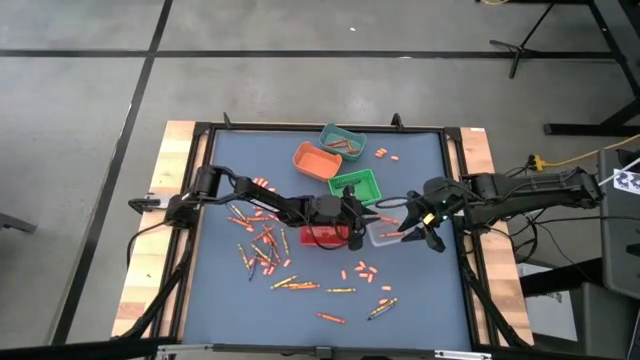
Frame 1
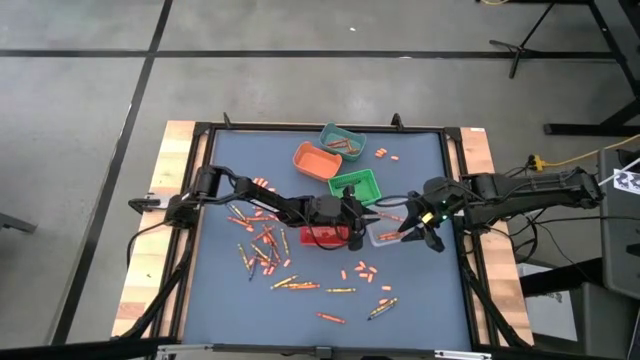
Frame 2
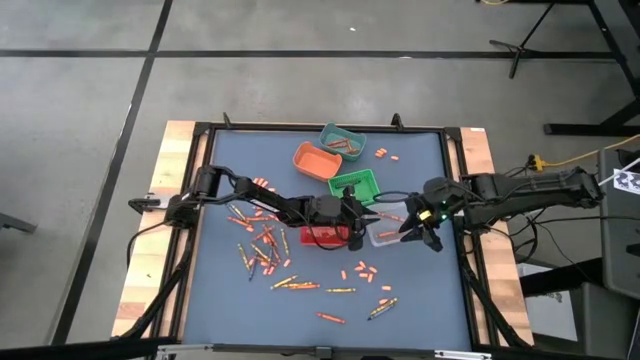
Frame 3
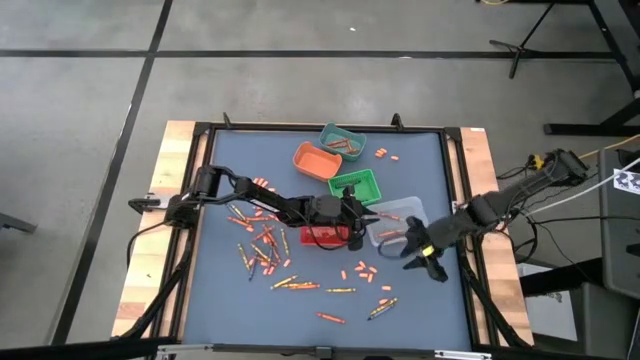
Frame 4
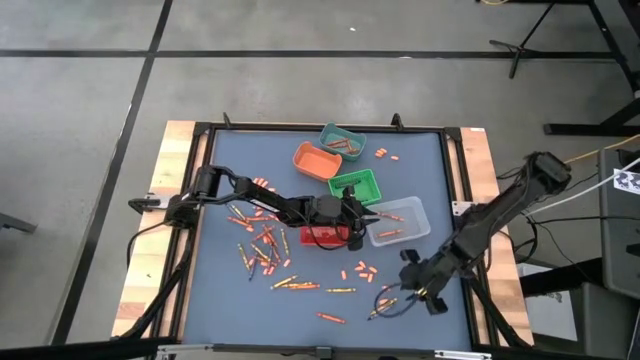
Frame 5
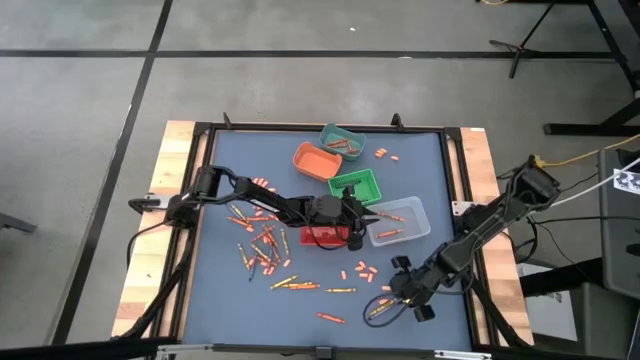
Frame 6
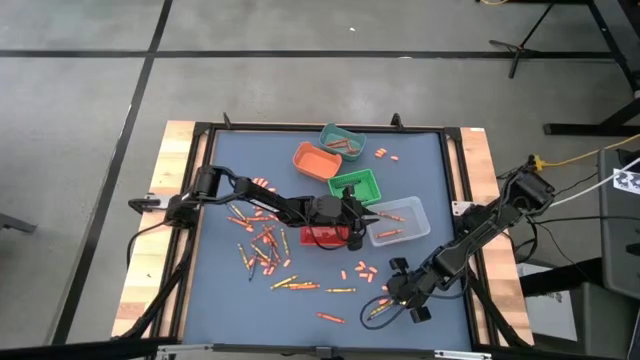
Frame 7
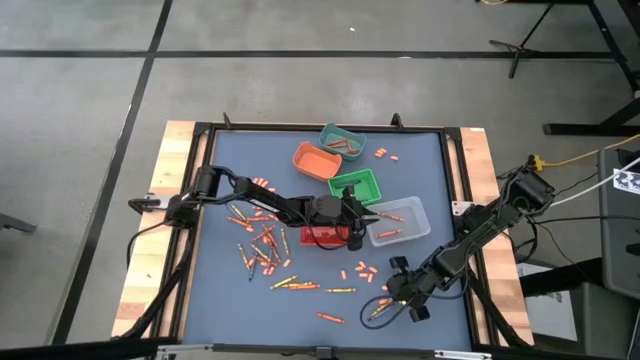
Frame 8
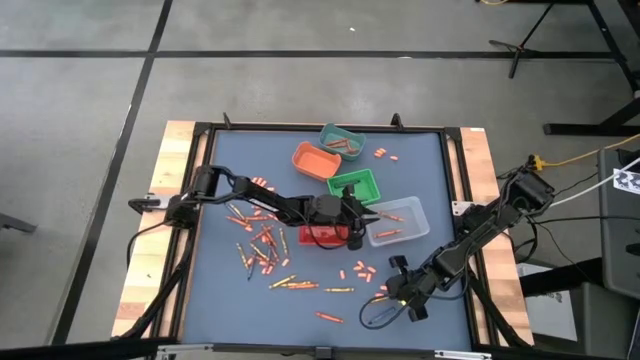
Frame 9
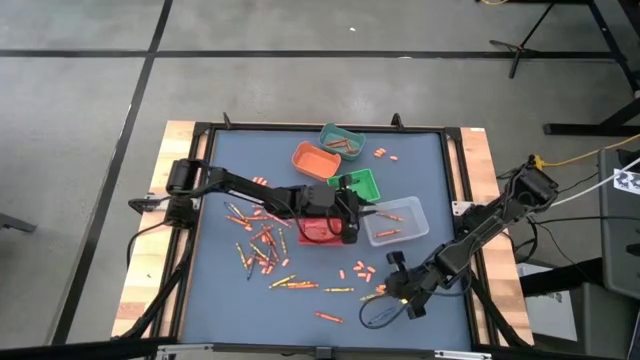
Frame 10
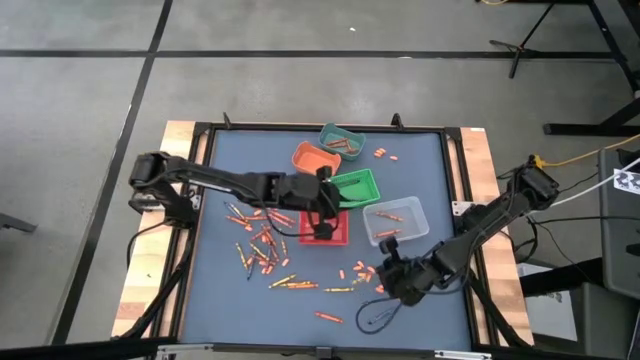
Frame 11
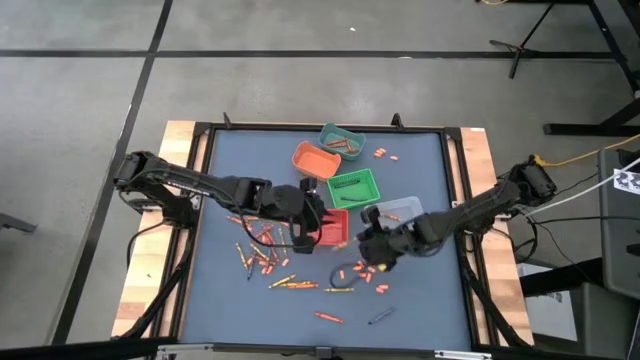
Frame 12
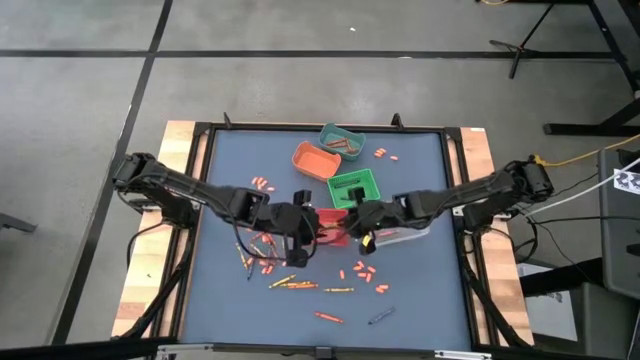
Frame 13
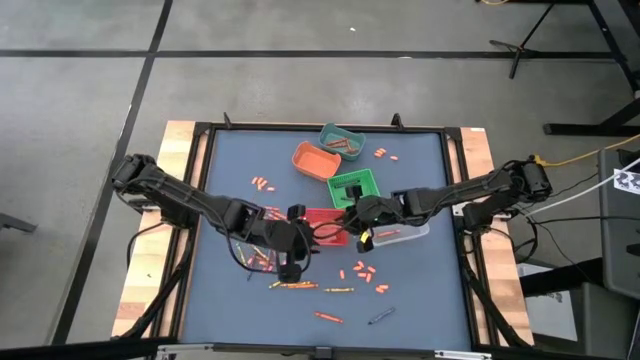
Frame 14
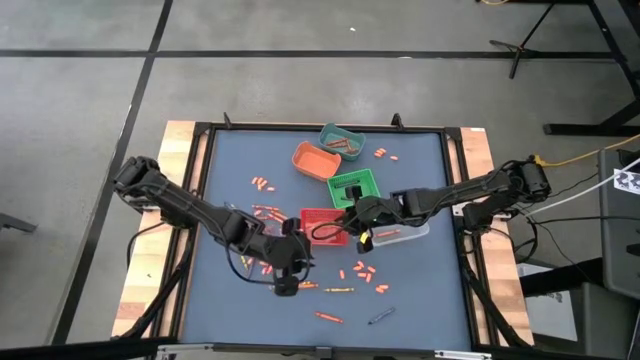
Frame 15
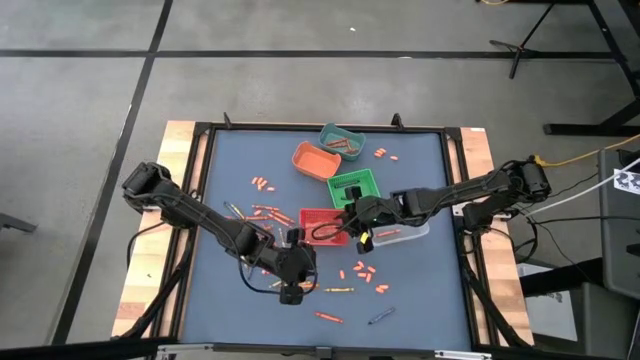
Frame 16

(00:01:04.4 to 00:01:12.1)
Task: Sort crayons
Put the yellow crayon into the red bin

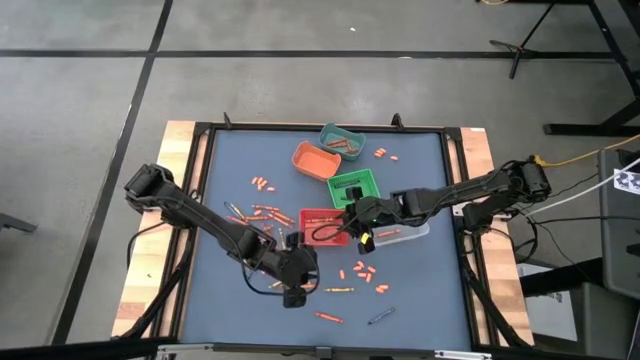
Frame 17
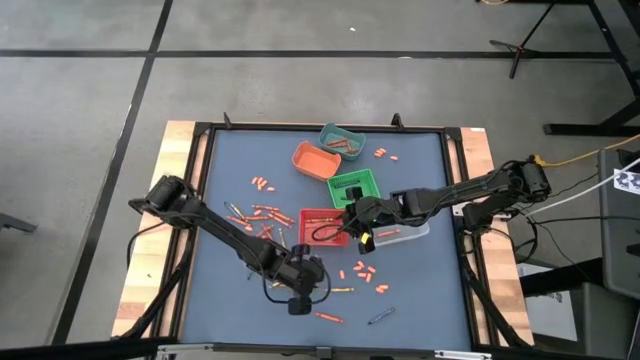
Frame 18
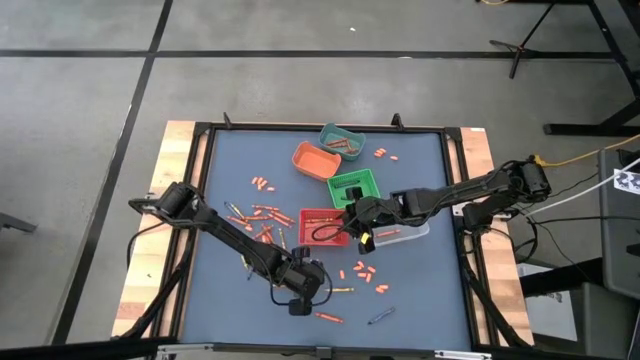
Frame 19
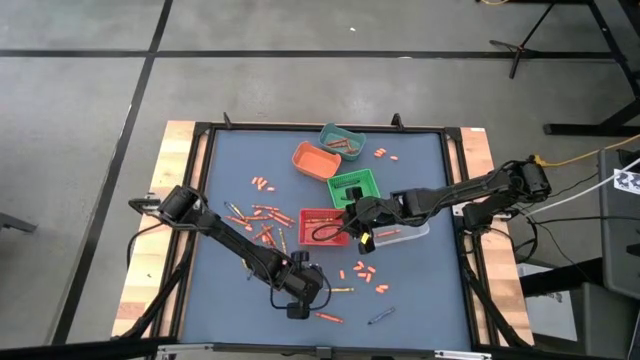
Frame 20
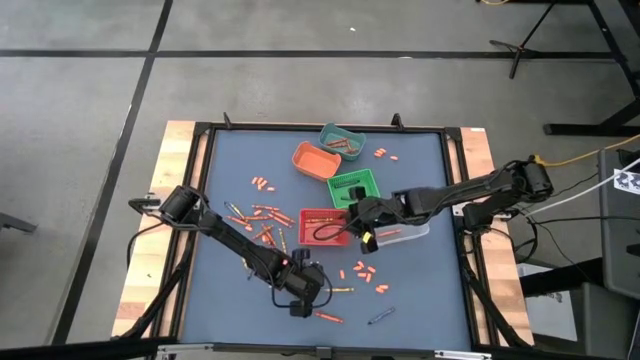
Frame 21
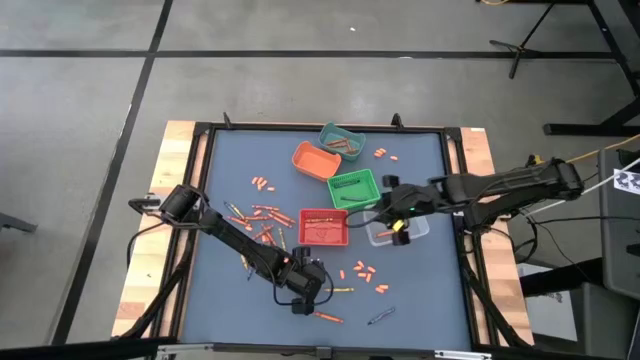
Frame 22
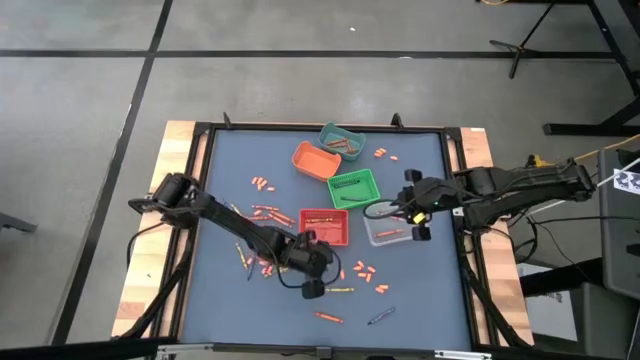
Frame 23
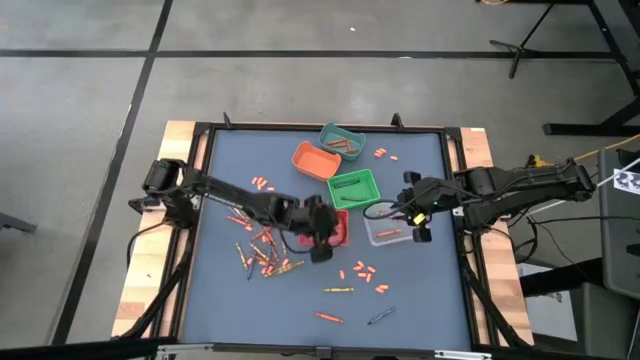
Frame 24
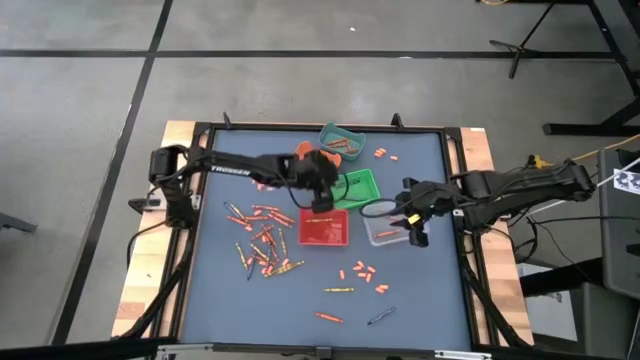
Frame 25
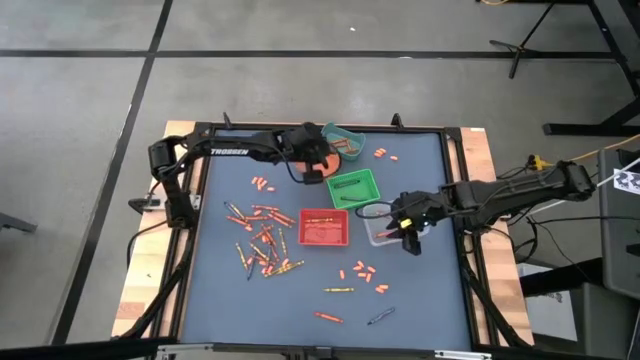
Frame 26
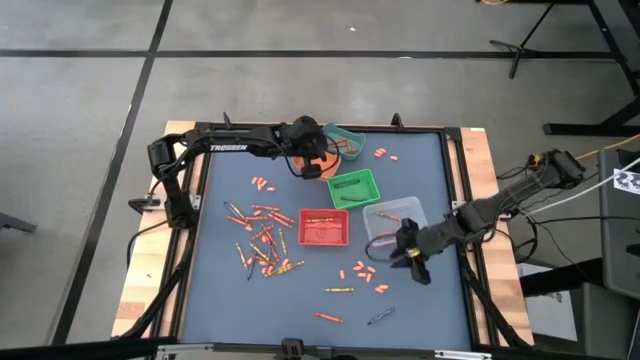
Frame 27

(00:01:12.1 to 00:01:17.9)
Put the orange crayon into the orange bin

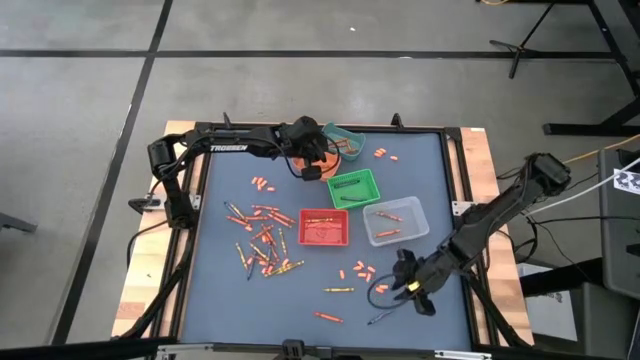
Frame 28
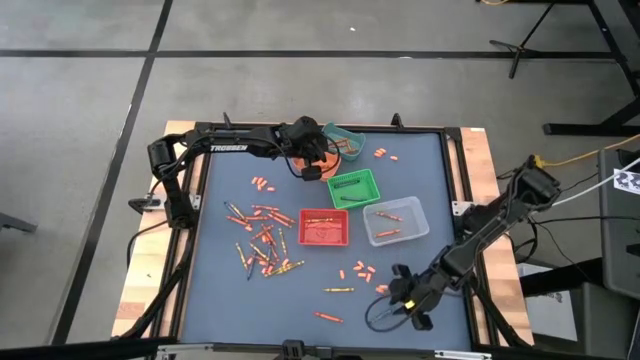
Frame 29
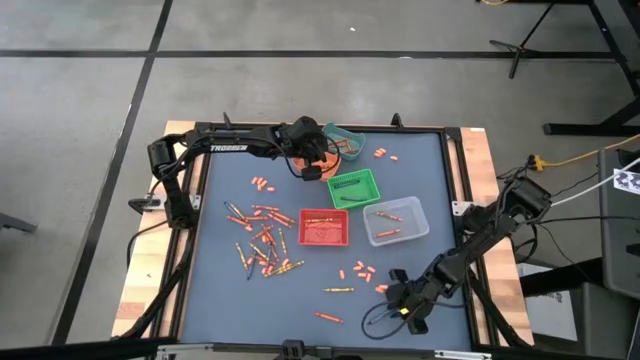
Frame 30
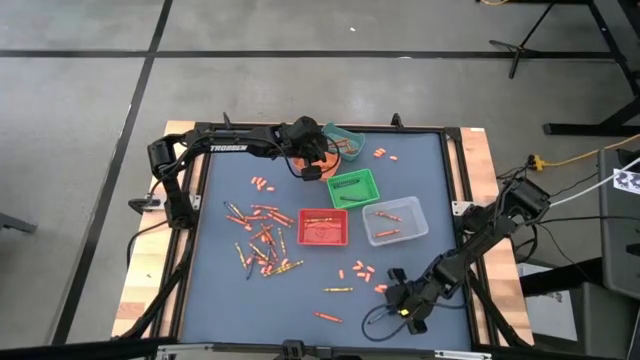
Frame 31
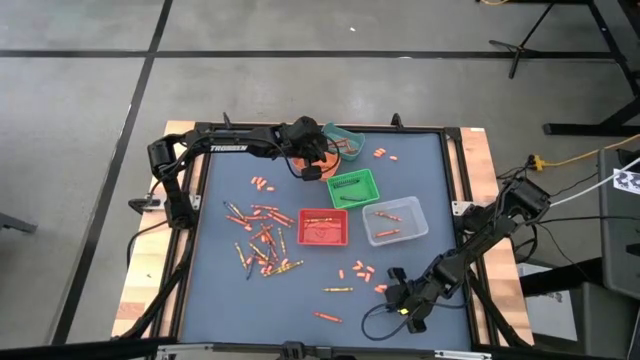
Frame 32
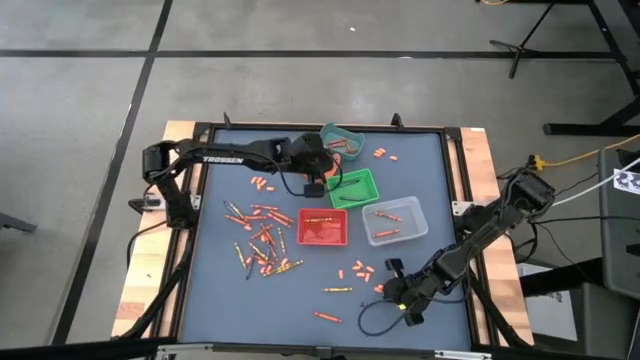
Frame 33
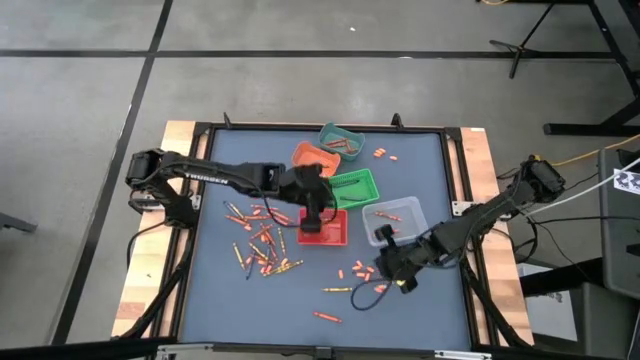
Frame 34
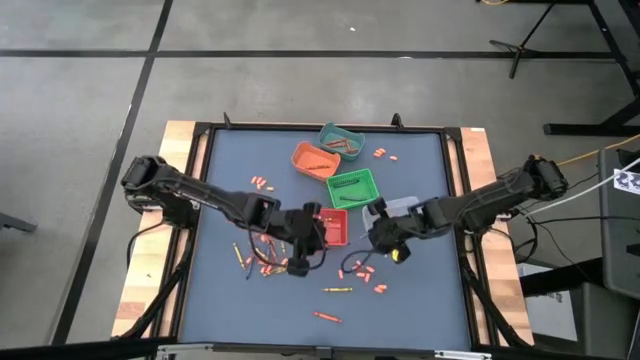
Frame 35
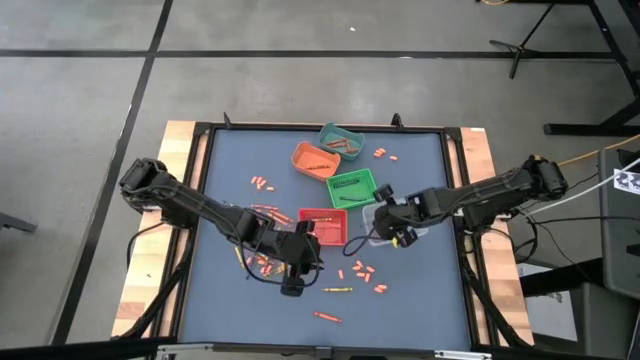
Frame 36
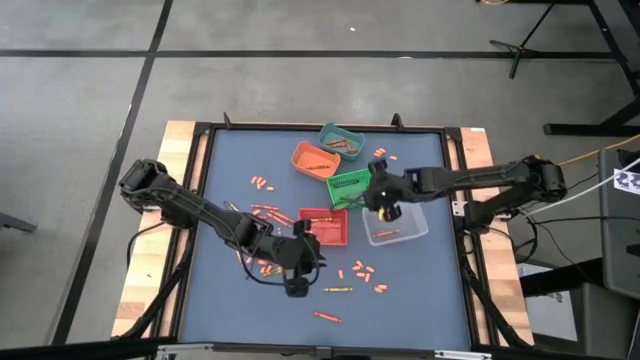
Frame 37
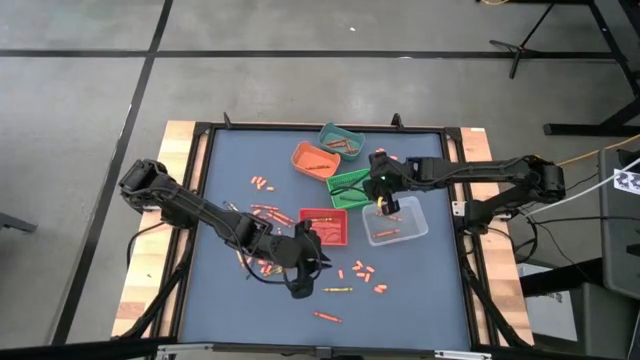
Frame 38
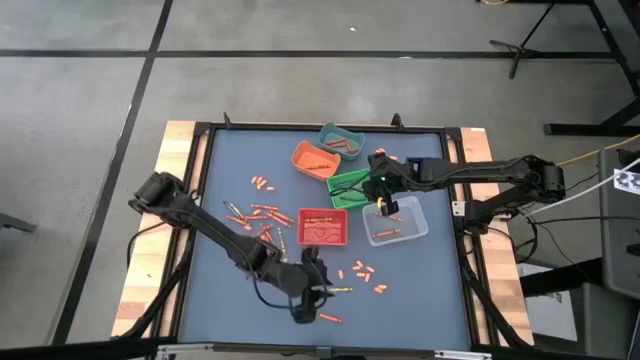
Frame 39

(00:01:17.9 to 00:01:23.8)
Put the blue crayon into the green bin

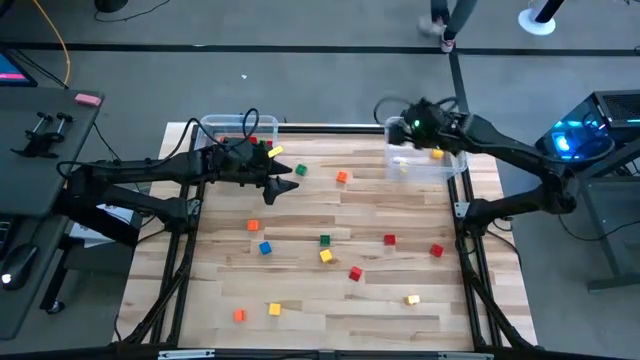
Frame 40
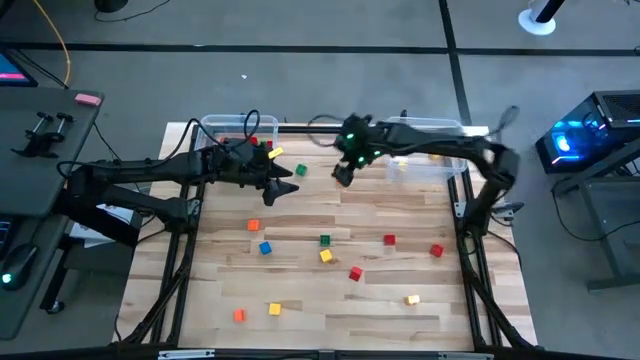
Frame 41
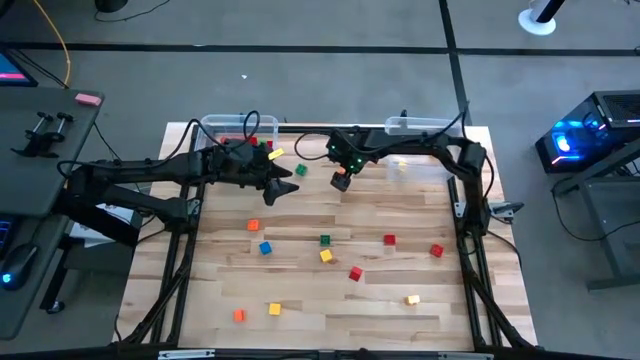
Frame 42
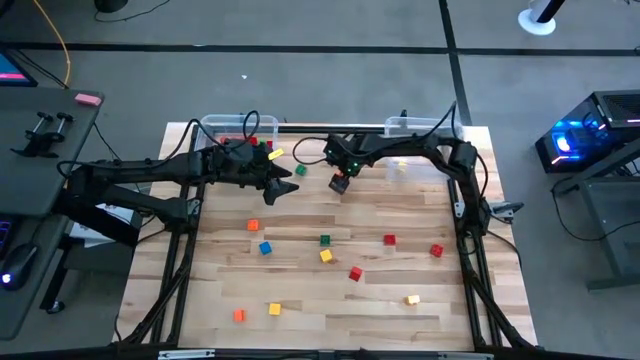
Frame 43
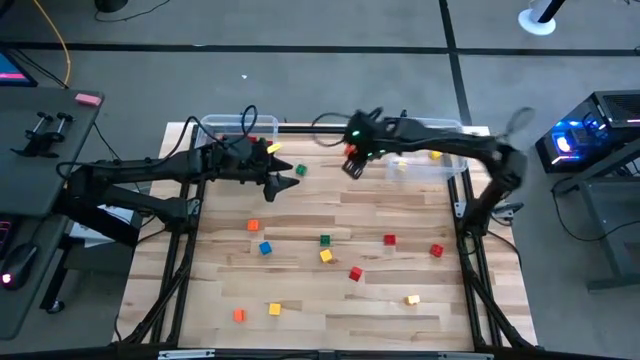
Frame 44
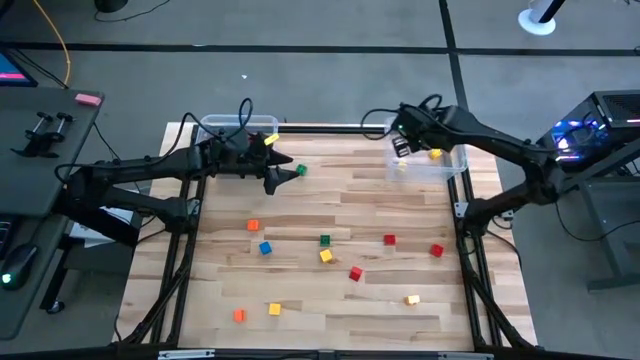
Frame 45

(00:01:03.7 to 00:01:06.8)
Task: Sort blocks by size
Put the small game piece into the right transparent bin
